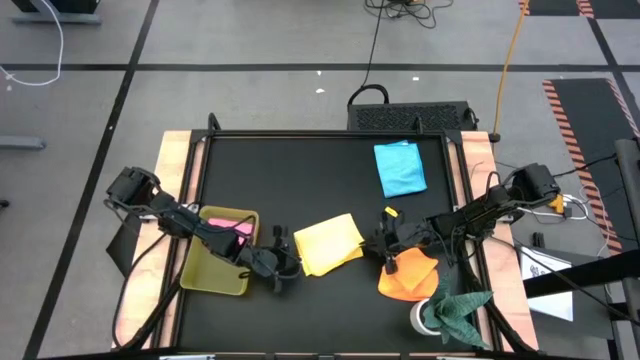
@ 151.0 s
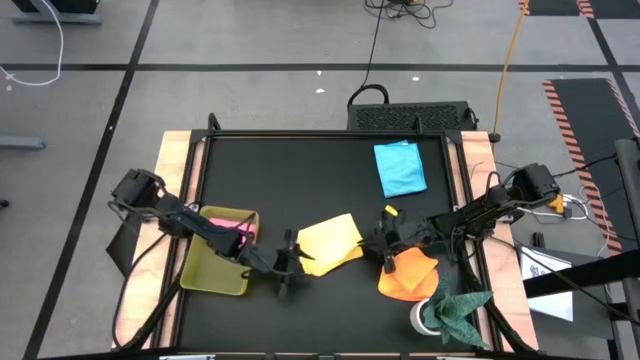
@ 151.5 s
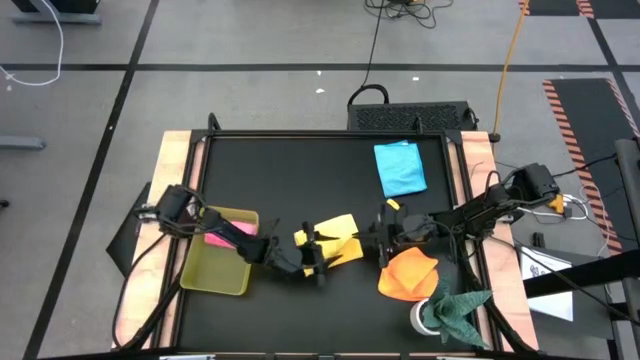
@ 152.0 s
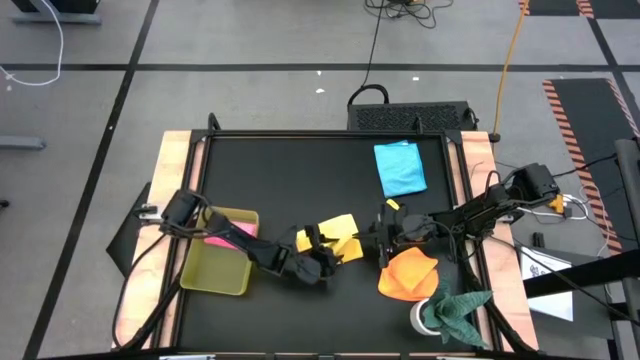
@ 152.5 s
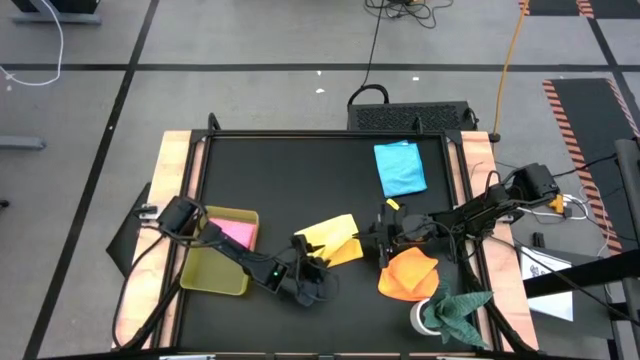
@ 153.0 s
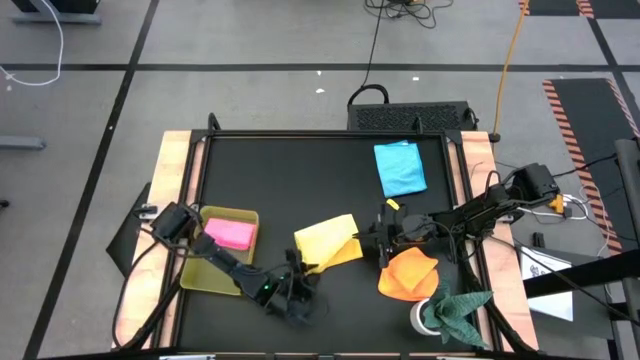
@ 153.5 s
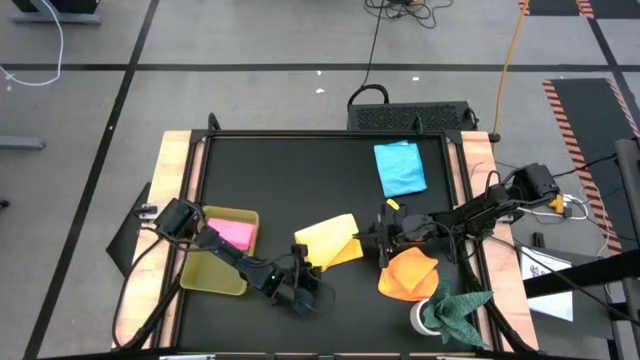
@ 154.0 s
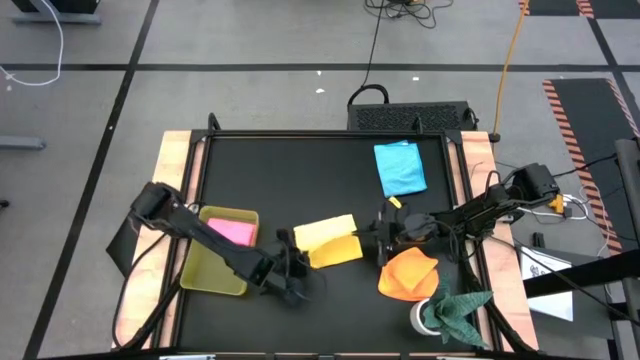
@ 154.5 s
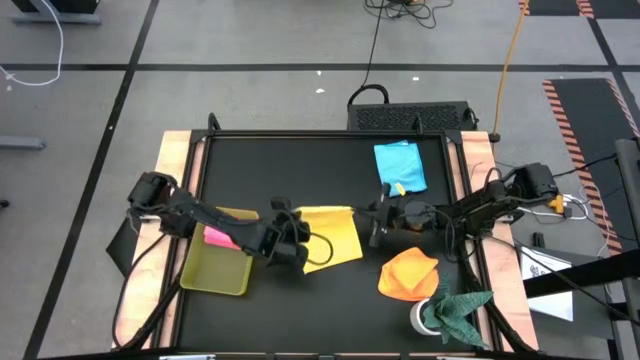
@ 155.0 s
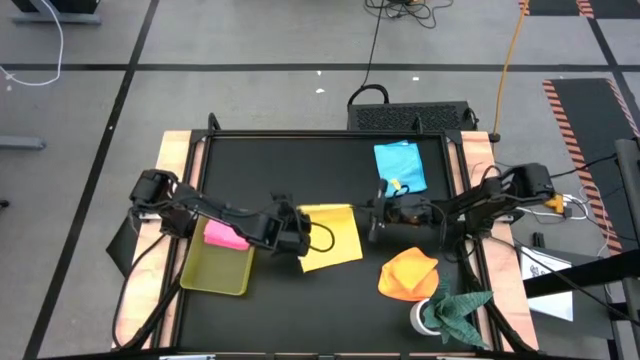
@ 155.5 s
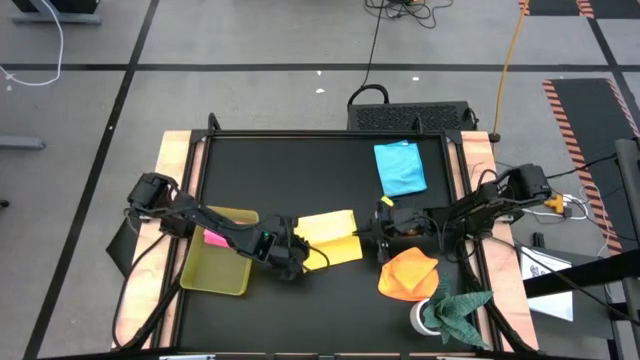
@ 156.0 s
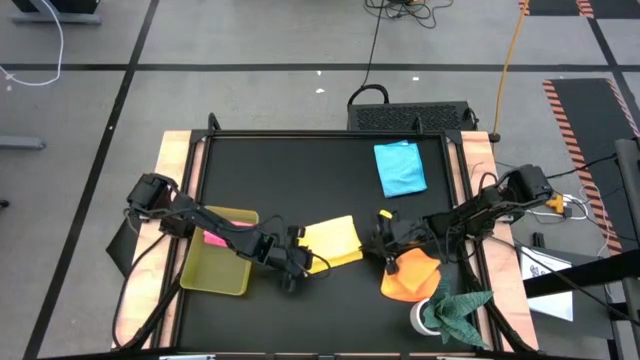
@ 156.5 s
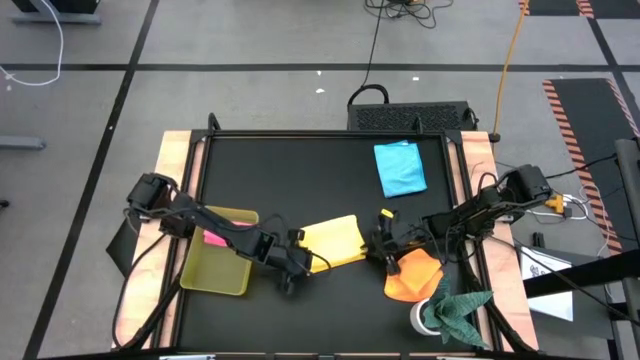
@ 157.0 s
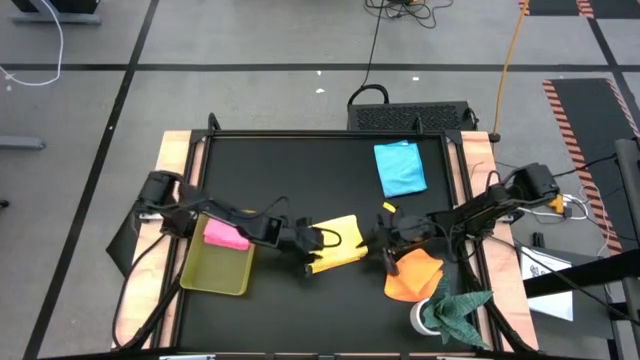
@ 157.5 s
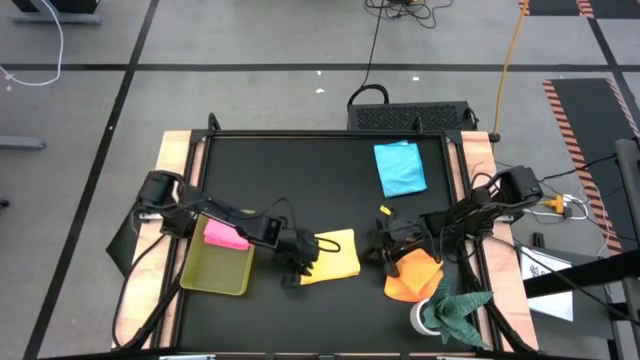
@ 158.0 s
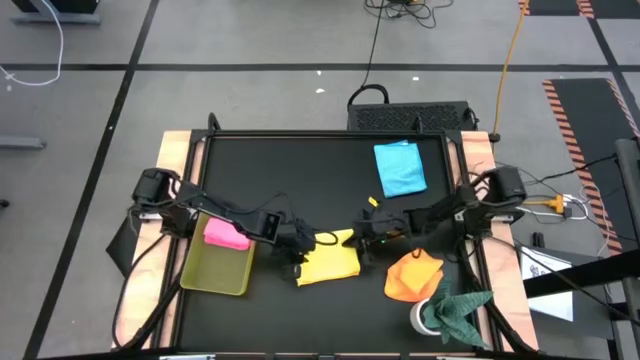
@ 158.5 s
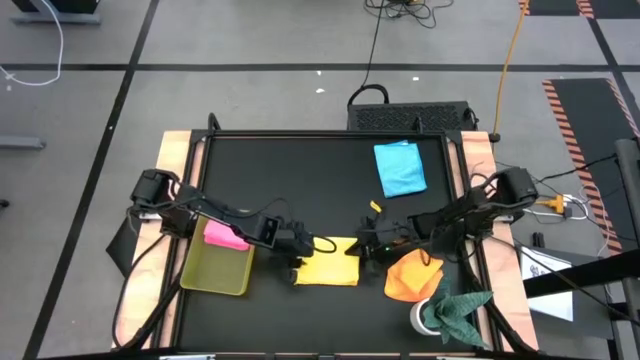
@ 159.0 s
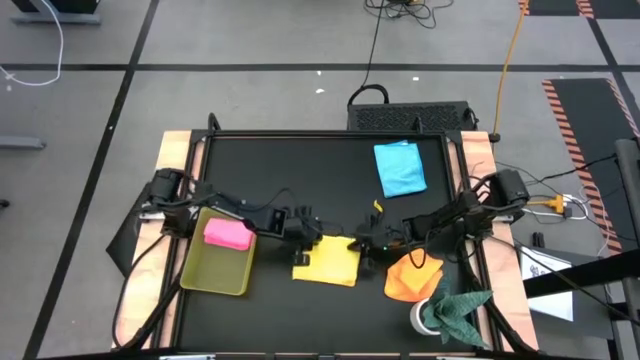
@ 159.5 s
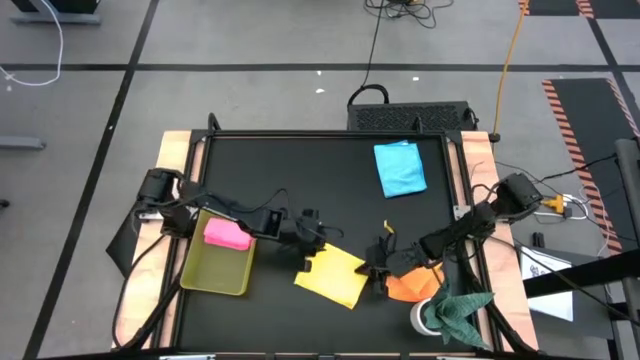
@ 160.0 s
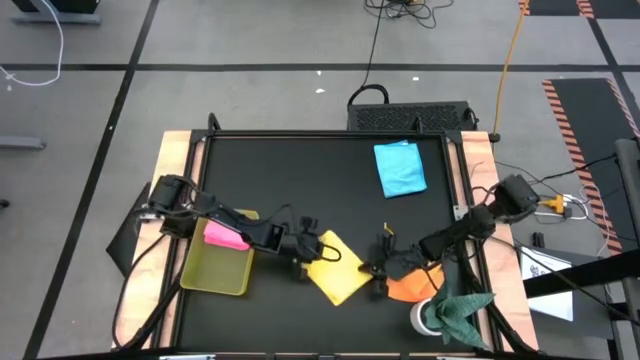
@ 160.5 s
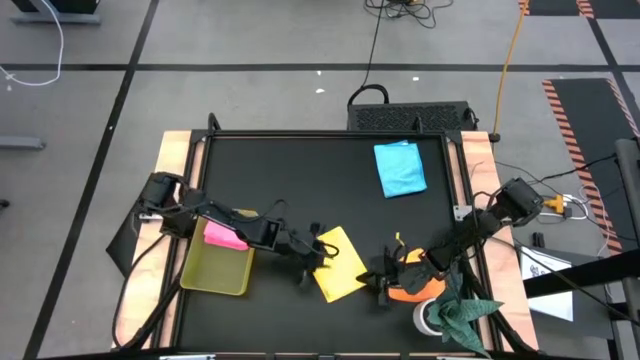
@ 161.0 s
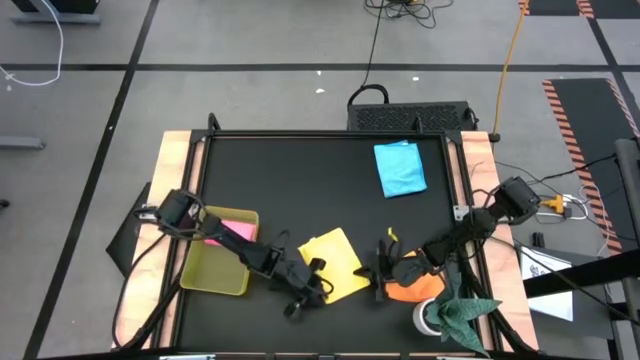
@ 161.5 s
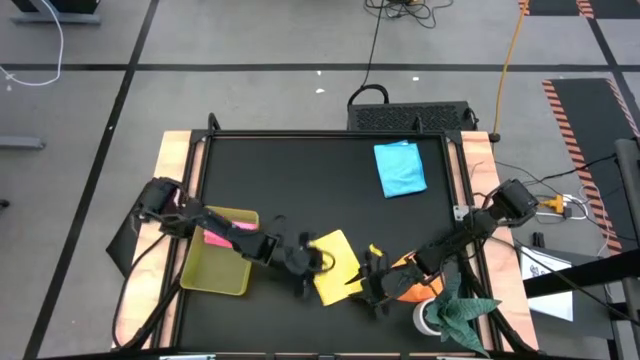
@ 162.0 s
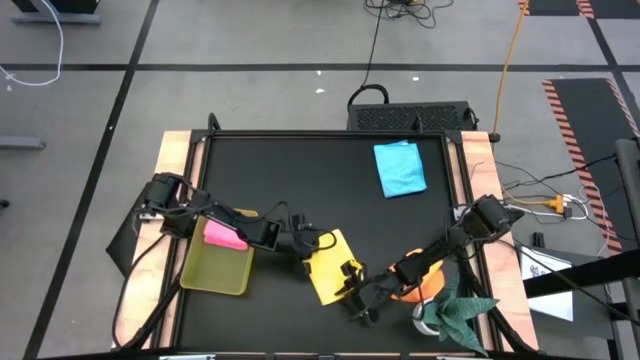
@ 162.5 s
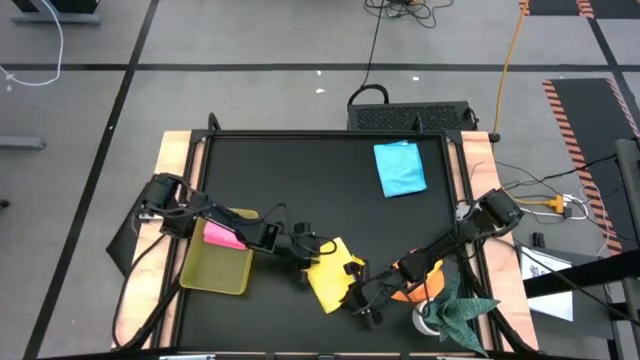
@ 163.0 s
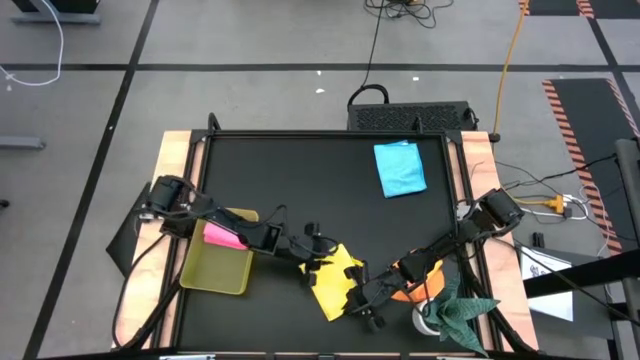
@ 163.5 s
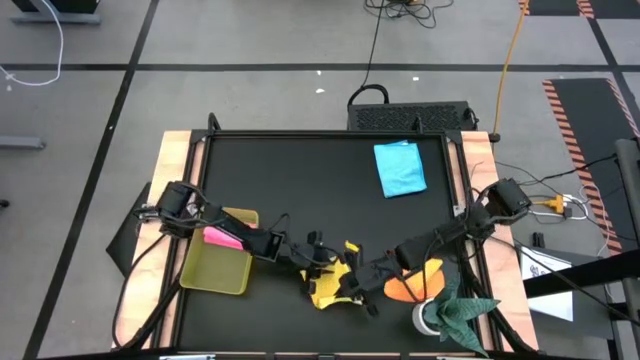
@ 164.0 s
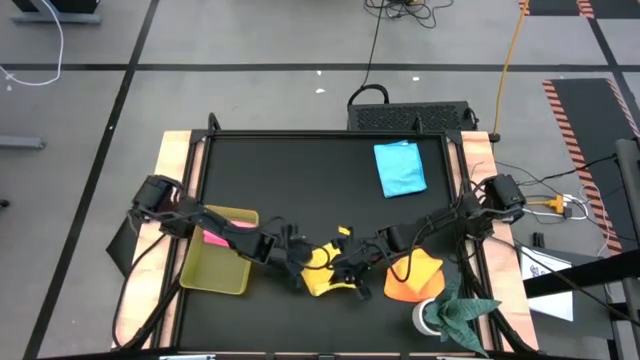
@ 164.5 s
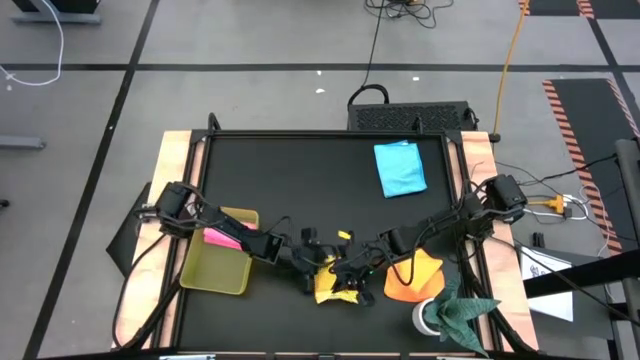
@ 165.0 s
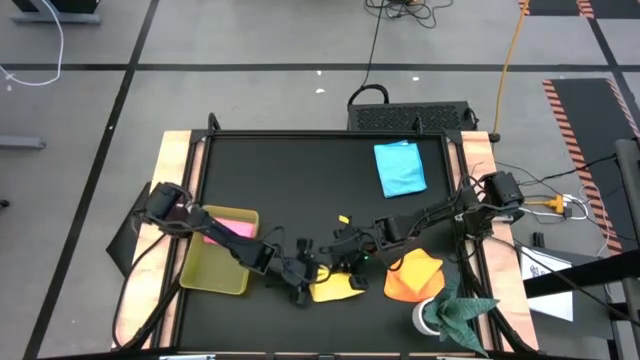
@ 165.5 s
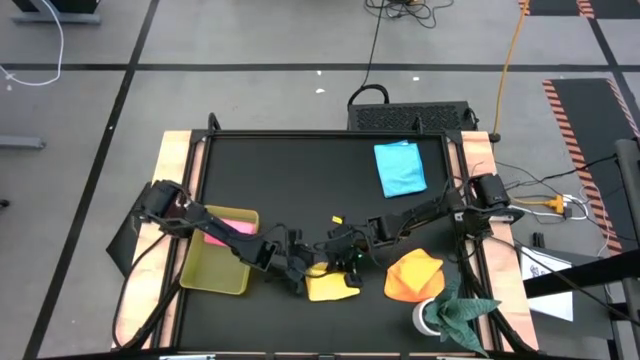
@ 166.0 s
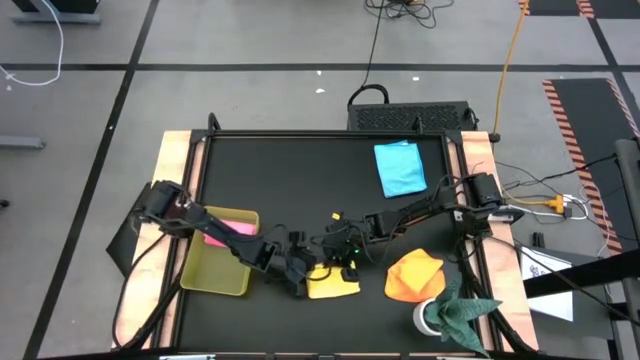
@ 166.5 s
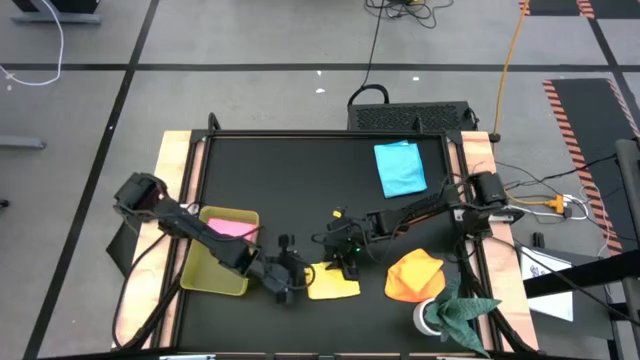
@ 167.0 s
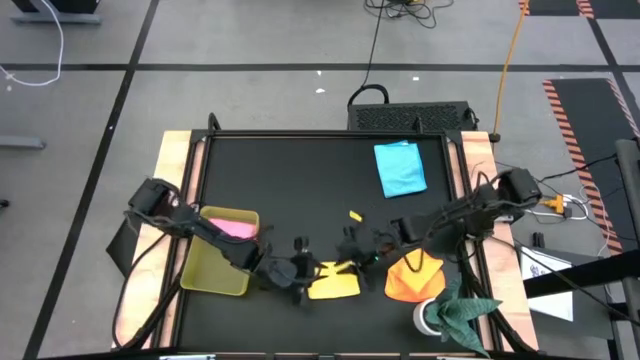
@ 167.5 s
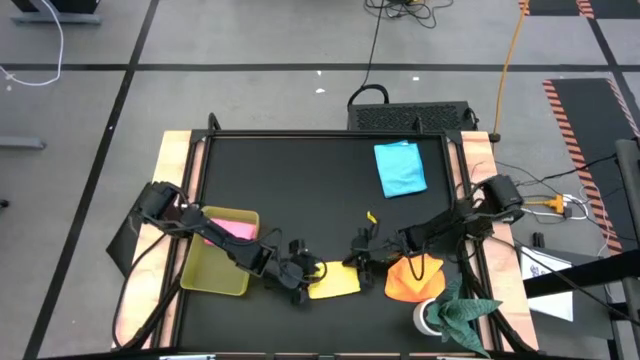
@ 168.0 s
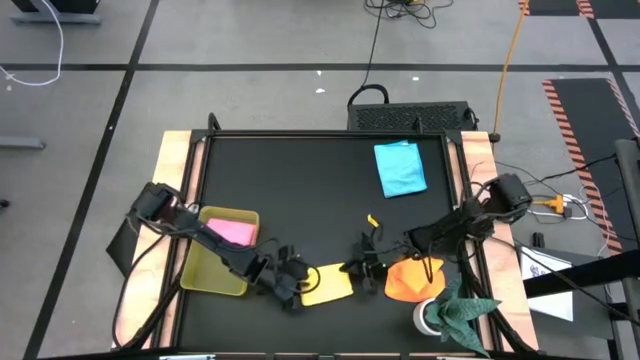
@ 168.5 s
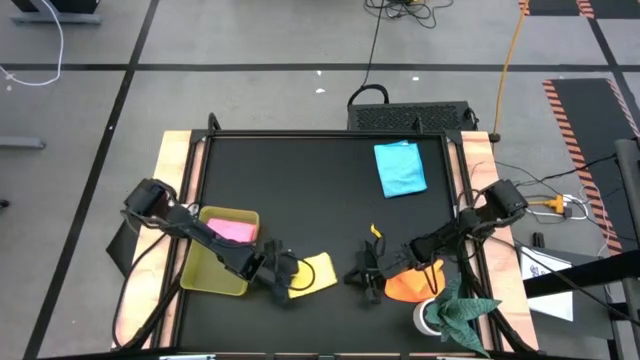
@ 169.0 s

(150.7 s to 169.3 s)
Task: Fold microfiber towels
Fold the yellow microfiber towel

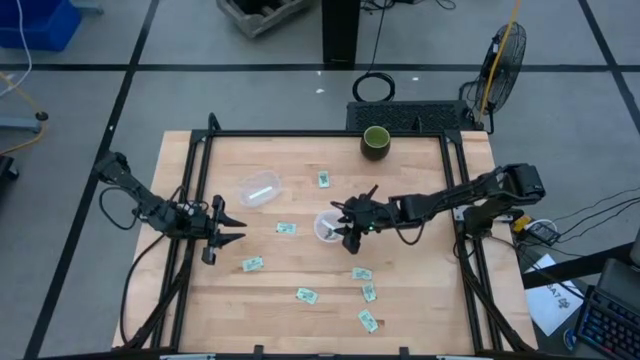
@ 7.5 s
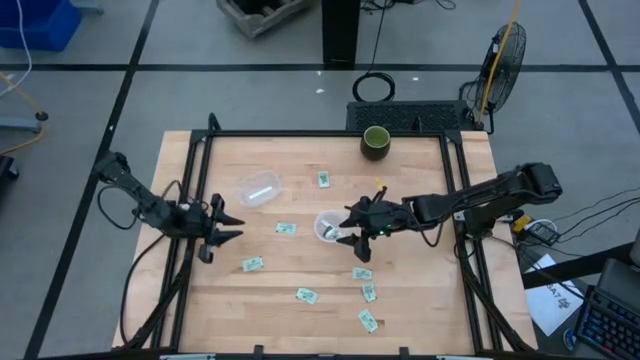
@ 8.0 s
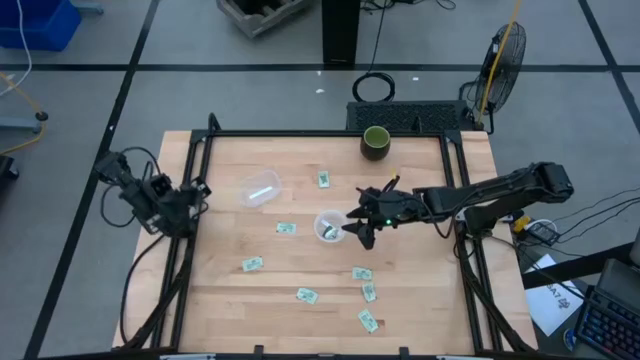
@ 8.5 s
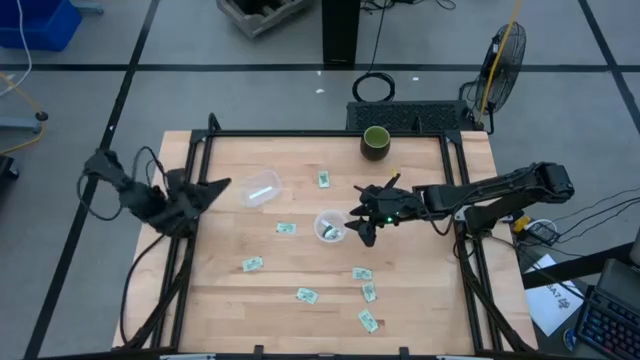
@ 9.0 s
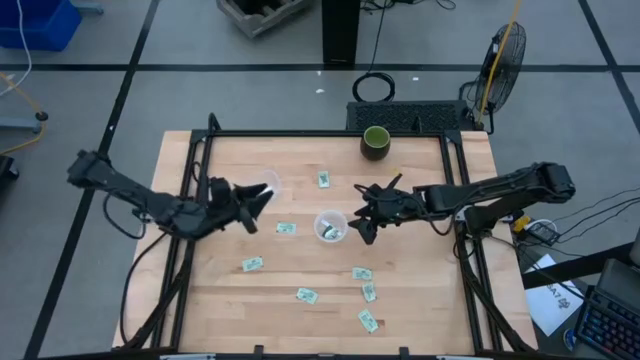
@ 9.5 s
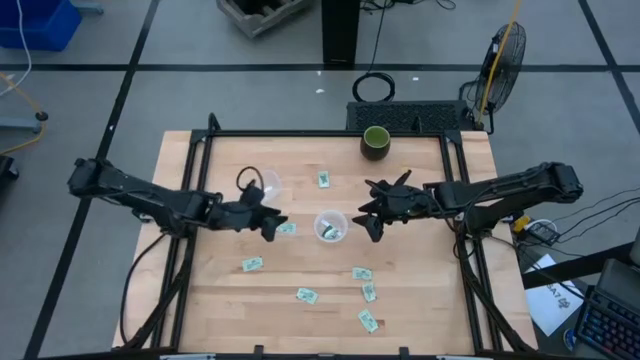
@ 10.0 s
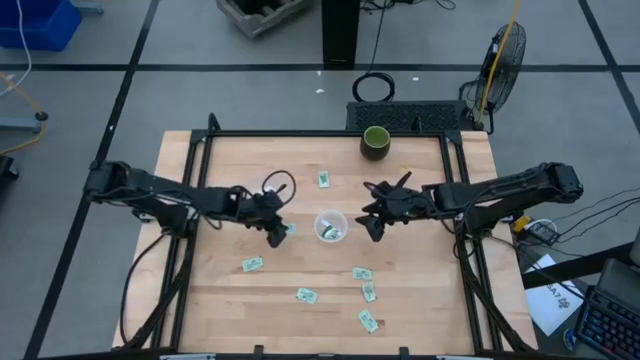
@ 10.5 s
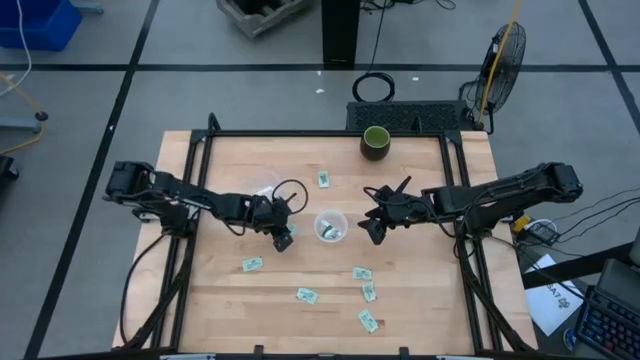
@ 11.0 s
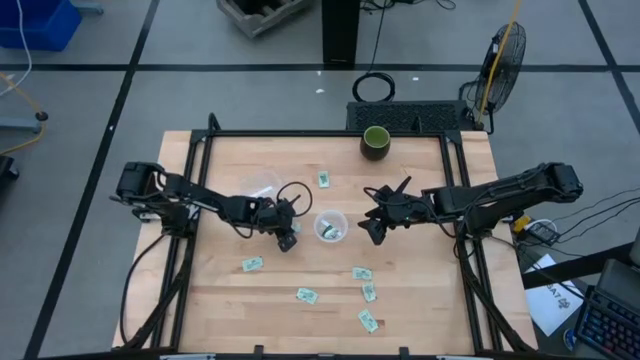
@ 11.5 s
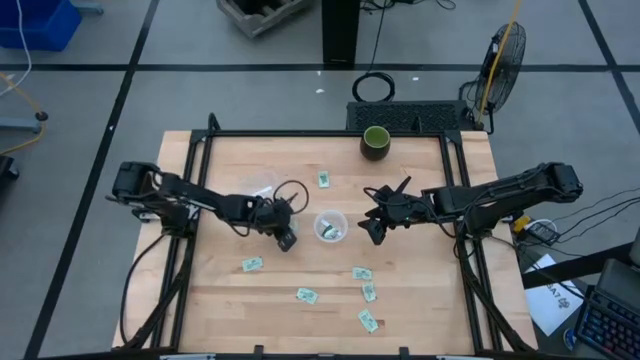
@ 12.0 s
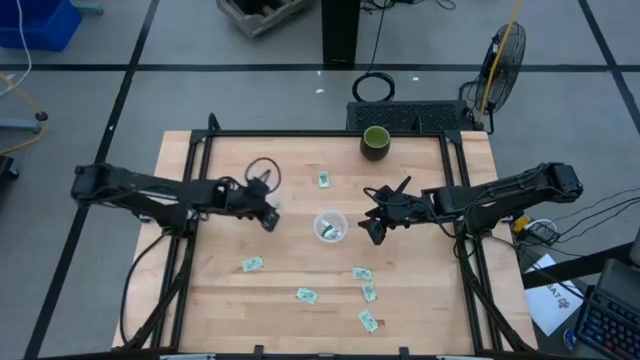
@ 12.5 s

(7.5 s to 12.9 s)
Task: Pick and place items into bin
Put the stevia packet into the left transparent bin
